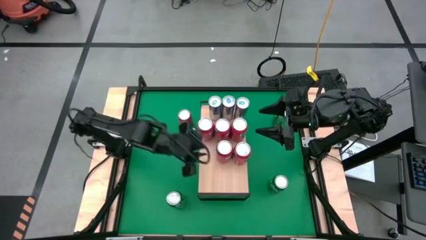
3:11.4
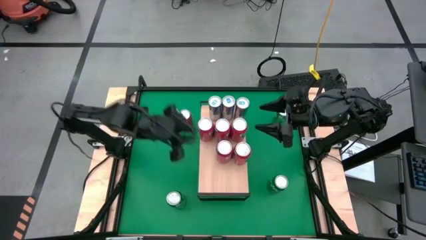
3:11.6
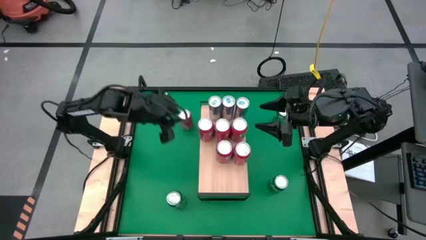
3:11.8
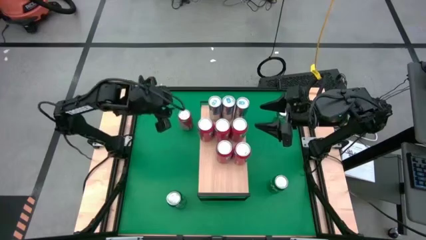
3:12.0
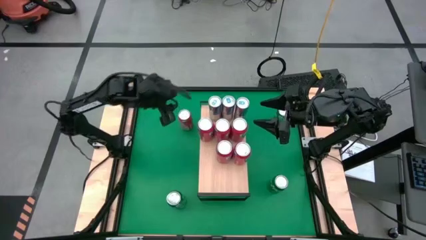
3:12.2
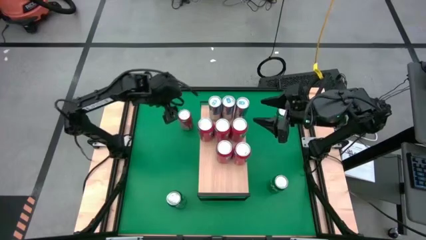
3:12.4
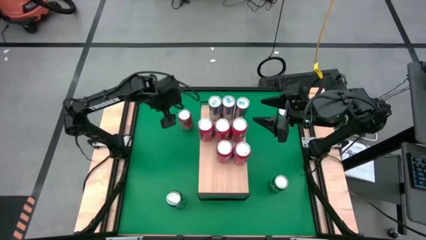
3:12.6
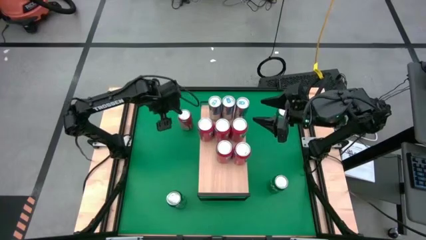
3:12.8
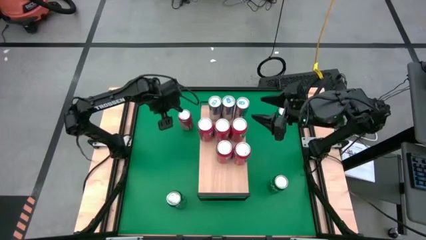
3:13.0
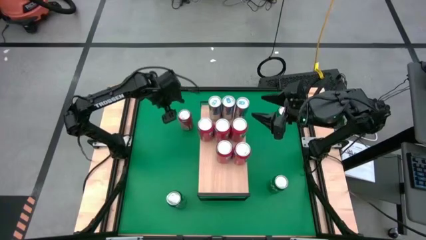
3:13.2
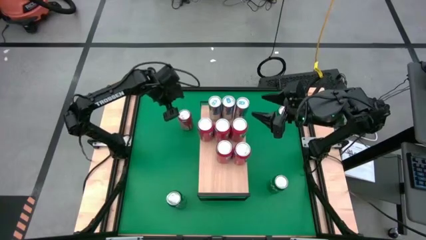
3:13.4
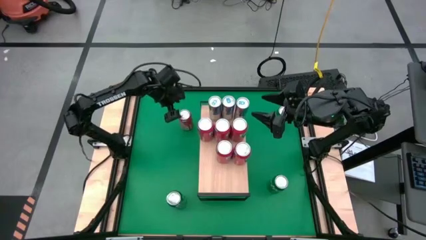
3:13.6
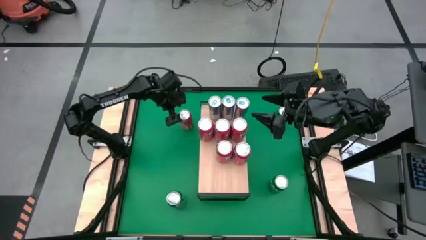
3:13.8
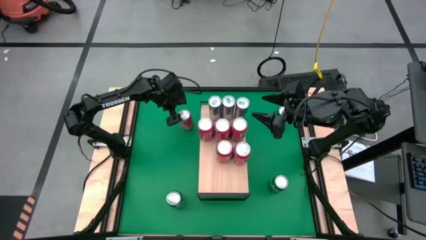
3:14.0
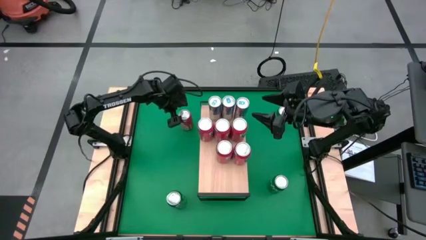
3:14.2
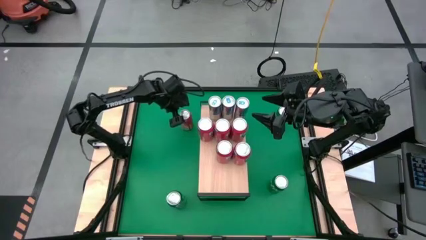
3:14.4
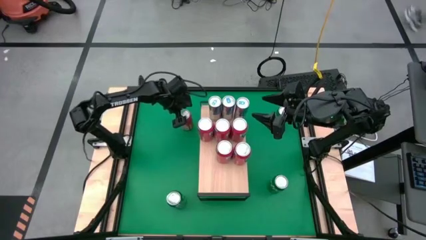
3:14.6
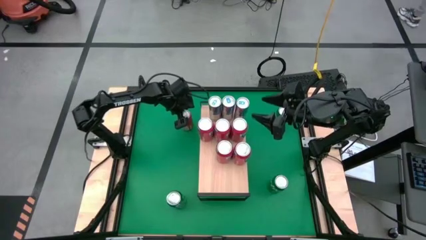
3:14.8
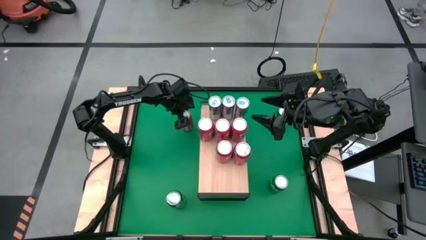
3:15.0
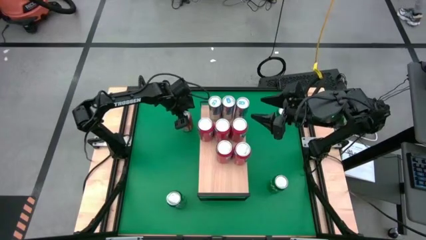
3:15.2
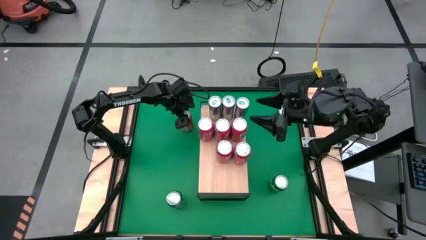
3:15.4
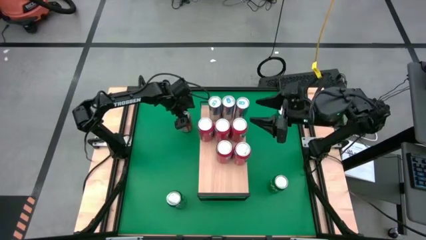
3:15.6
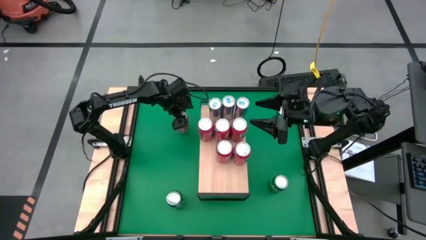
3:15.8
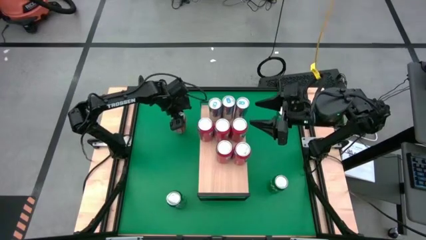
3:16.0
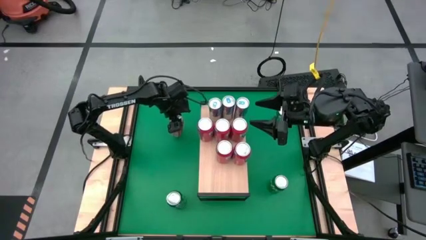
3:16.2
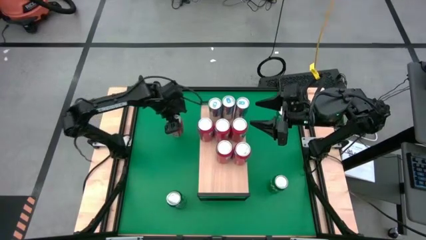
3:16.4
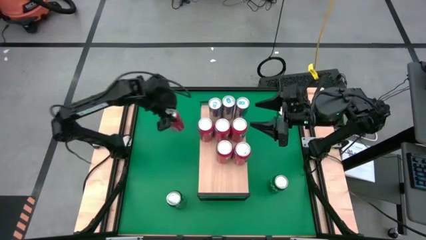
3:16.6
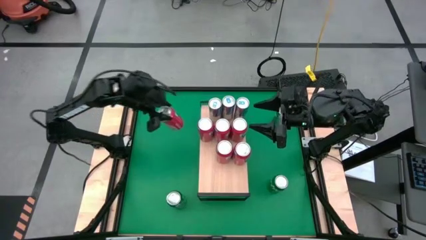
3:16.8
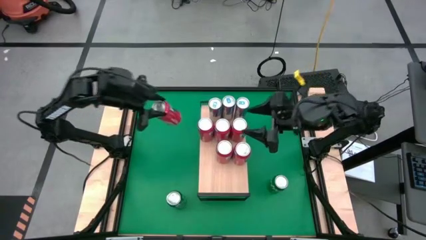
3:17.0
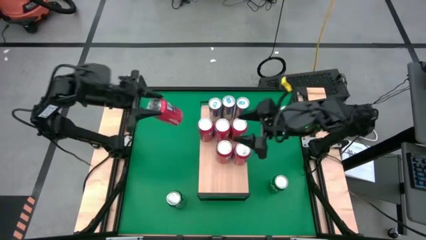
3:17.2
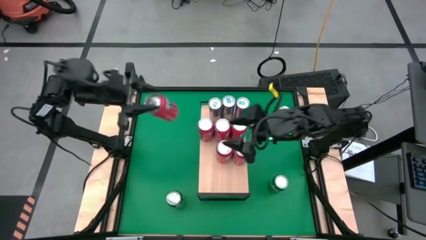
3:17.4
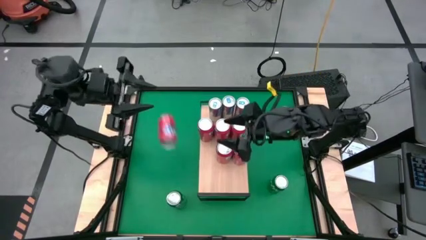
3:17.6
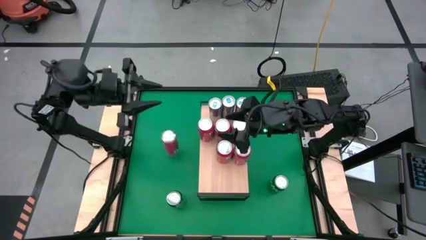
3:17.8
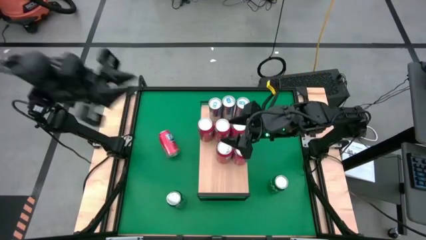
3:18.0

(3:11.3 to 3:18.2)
Task: Place canned beverage on shelf
Put the orange soda can on the shelf aligned with the other orange soda cans

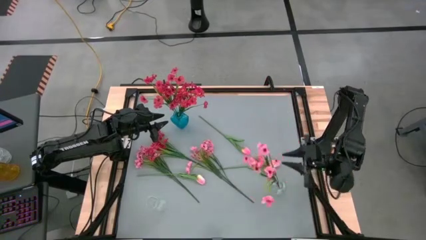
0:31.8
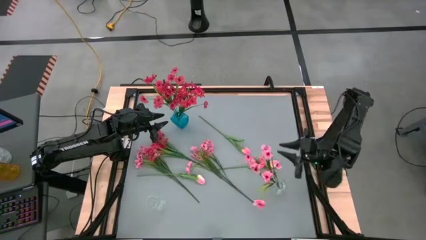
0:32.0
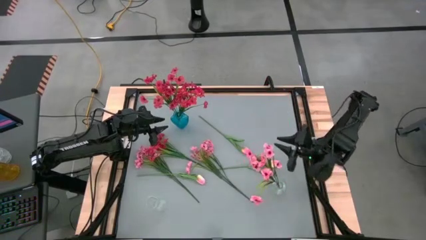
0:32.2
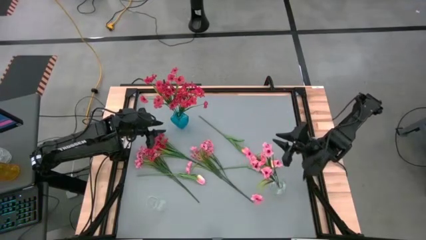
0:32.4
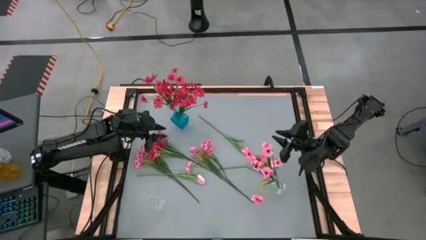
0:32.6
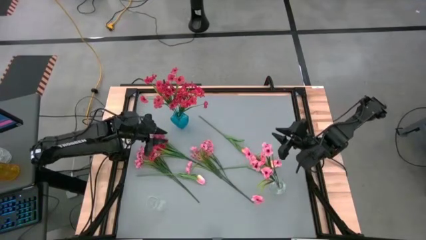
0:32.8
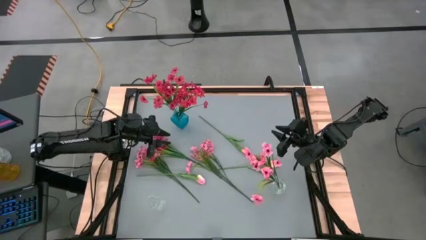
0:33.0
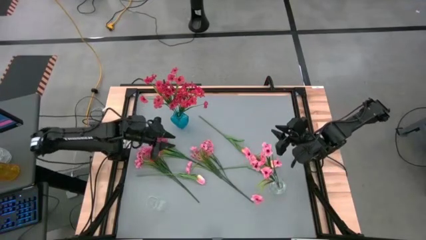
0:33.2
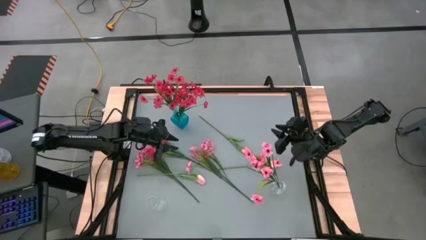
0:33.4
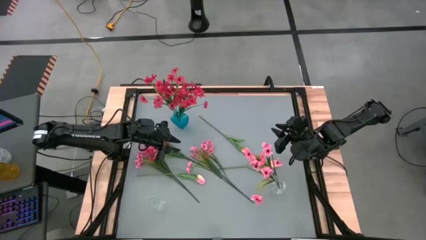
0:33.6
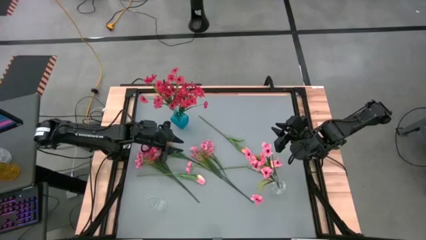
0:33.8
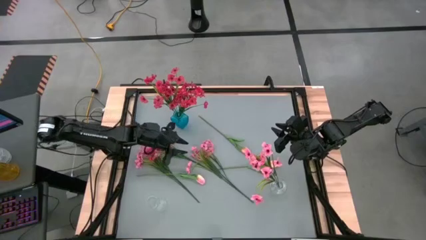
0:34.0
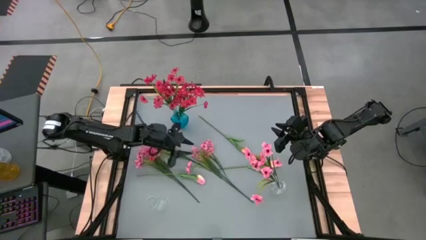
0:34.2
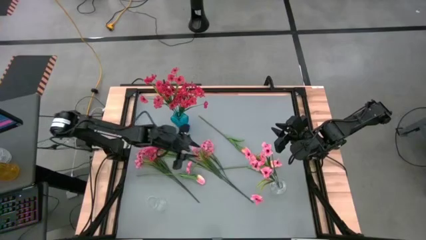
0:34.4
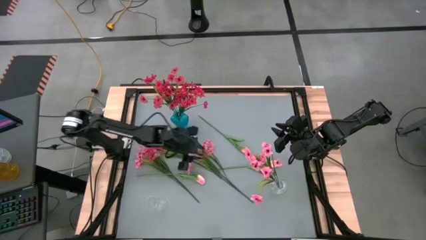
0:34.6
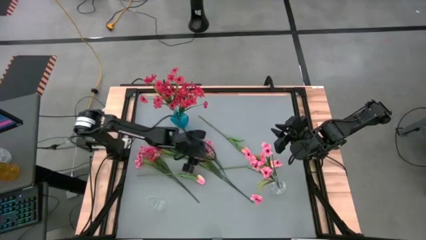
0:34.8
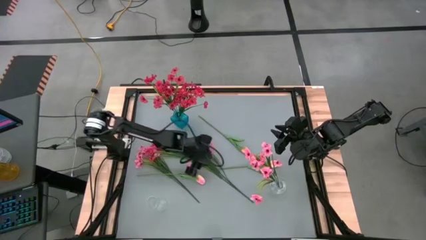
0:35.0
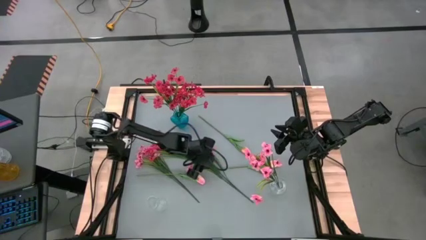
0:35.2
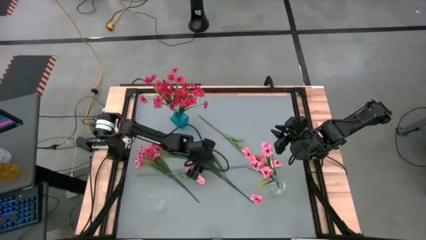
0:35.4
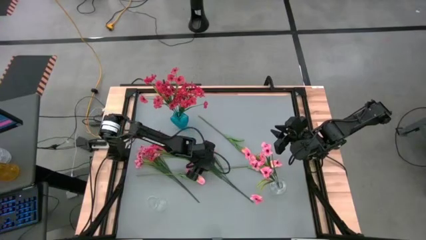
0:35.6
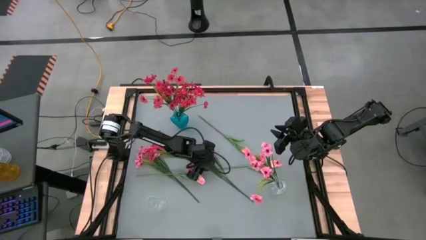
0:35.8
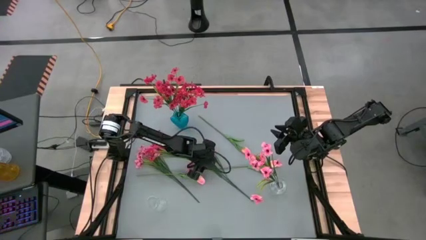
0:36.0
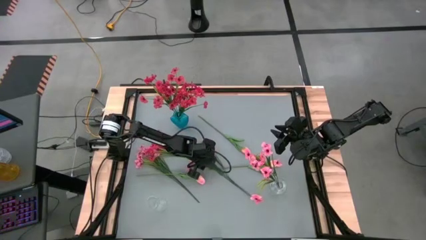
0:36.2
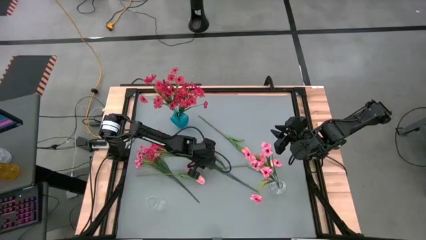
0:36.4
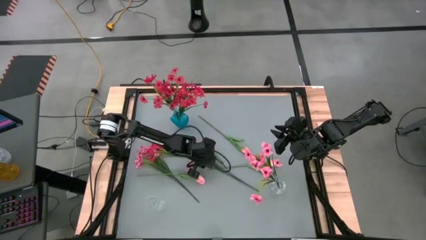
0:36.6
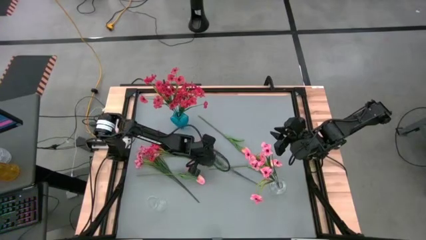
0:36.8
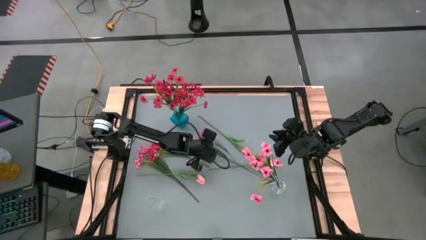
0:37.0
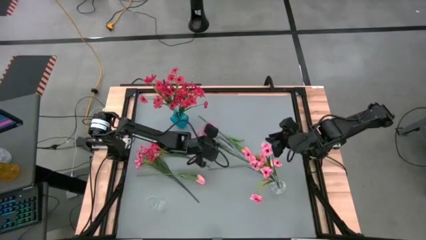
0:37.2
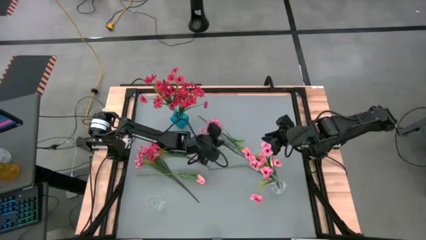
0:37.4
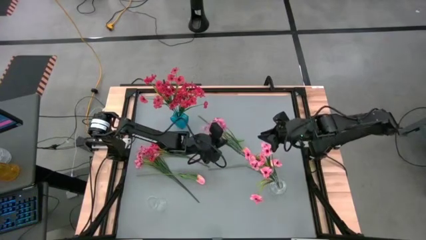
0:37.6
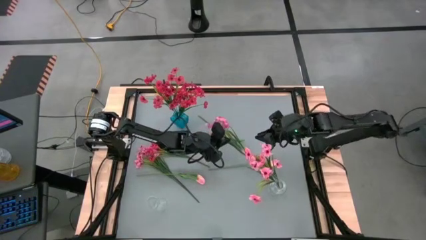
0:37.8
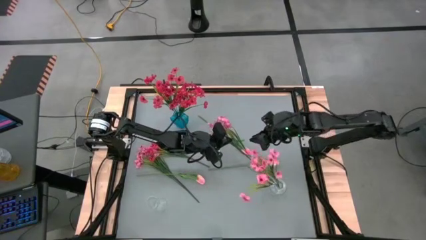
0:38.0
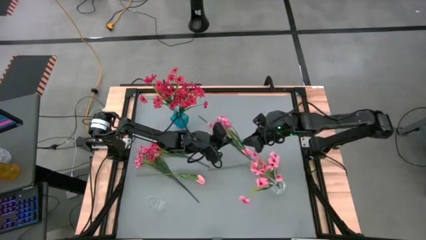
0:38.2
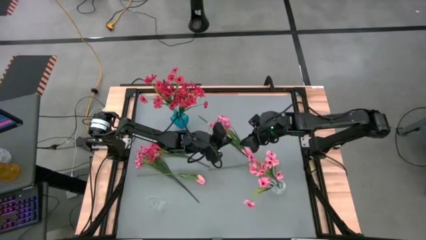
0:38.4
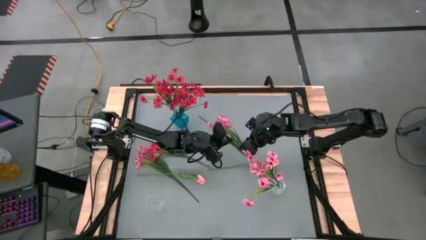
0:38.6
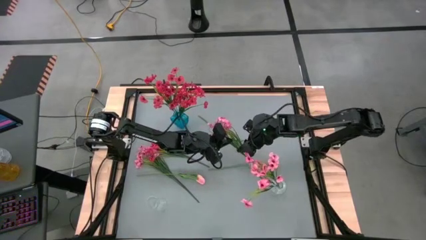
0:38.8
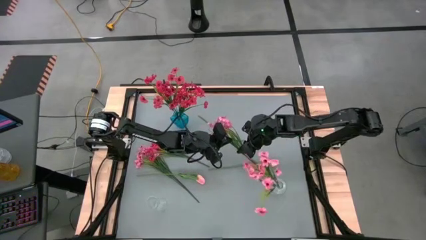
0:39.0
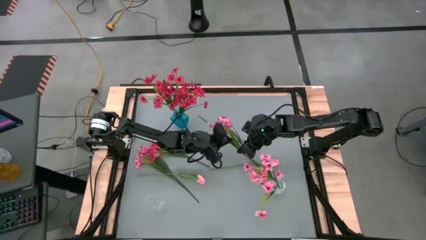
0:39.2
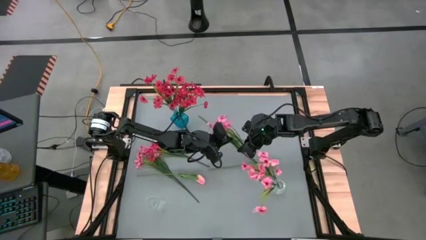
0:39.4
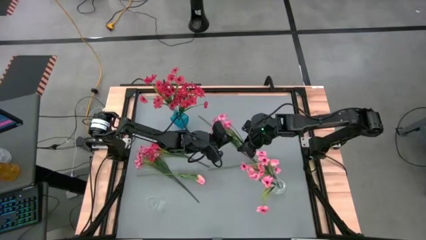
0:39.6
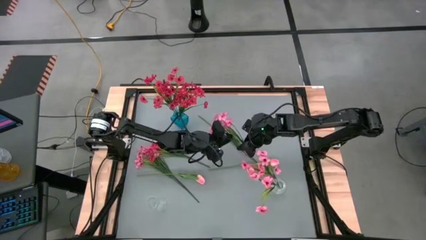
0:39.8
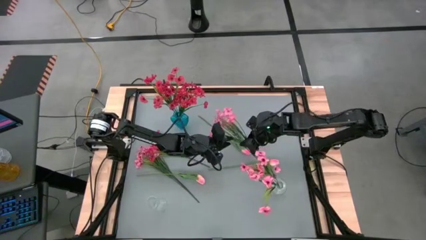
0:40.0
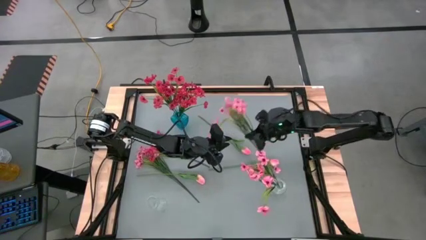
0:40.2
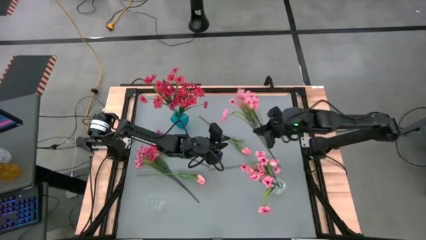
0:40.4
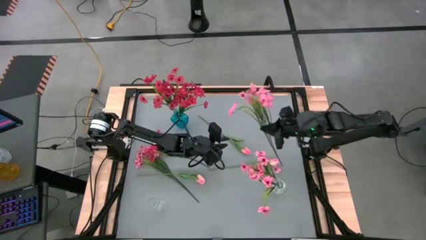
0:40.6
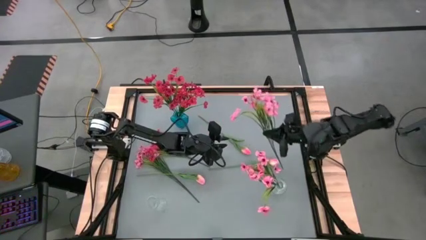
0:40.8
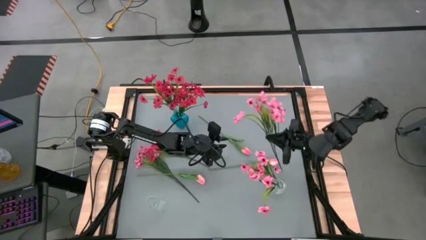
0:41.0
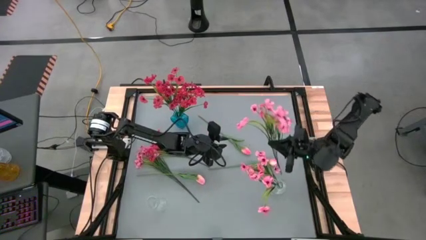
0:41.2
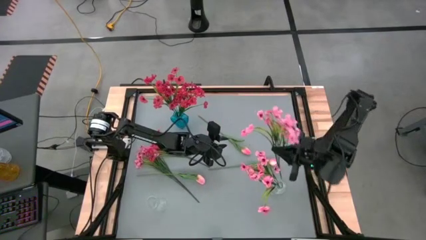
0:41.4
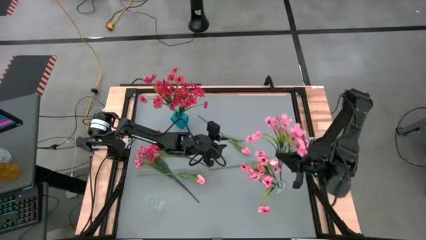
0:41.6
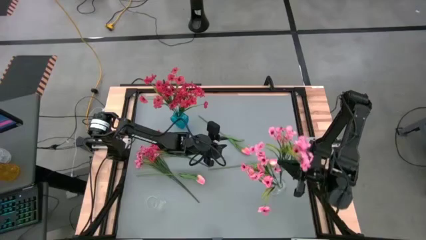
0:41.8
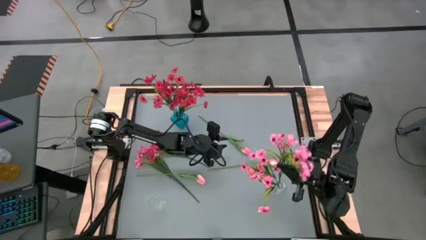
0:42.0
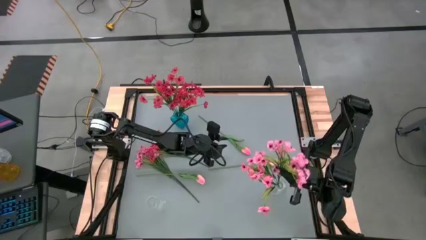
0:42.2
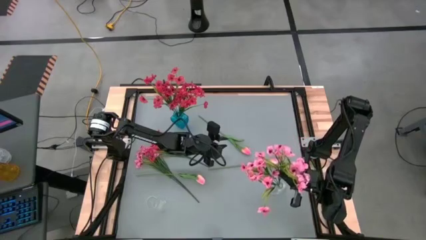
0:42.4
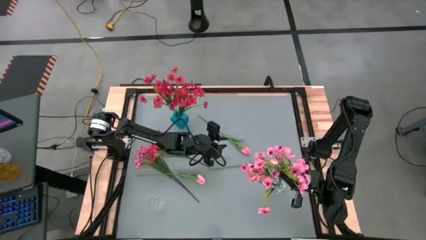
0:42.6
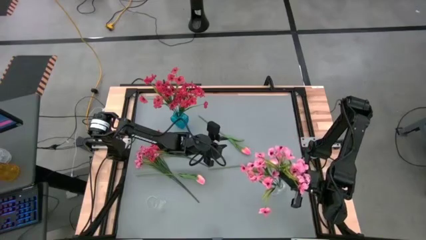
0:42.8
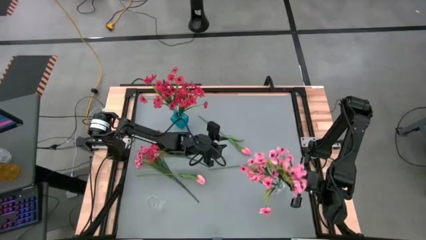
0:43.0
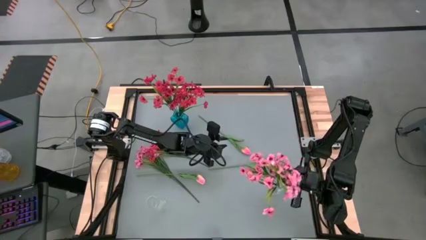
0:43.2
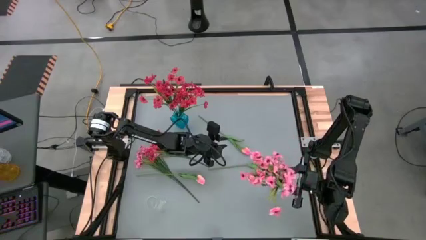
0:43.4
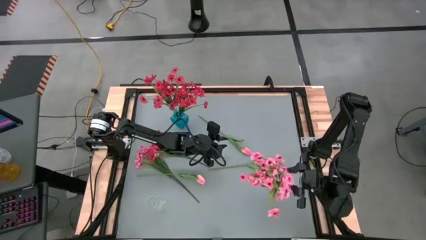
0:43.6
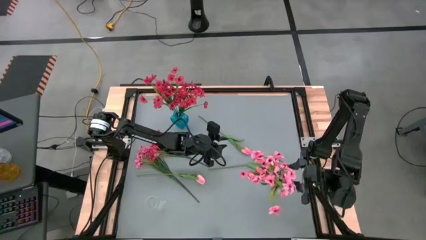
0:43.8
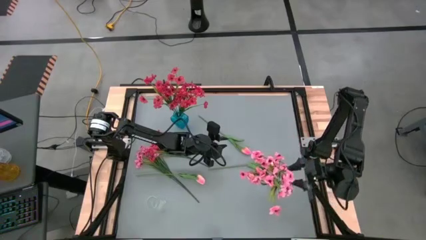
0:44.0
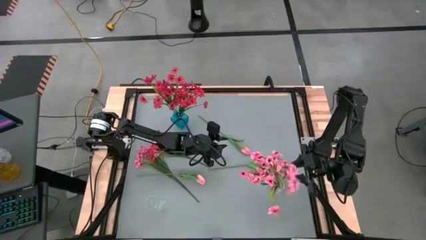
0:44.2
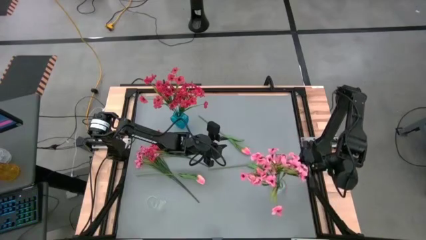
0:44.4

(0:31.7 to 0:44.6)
Task: Sort flowers into vase by color
Put the right pink flowers into the right transparent vase
